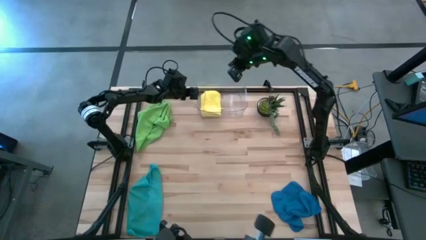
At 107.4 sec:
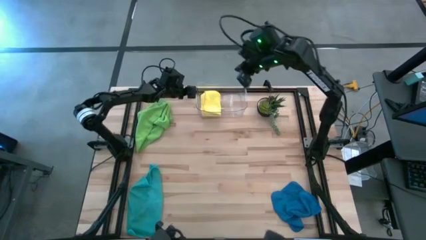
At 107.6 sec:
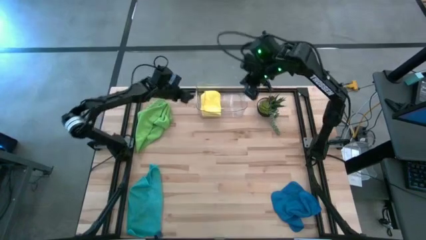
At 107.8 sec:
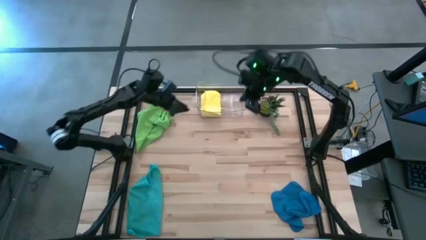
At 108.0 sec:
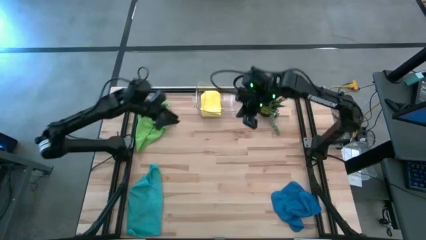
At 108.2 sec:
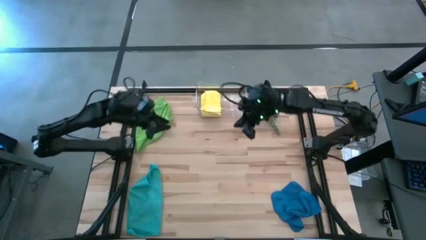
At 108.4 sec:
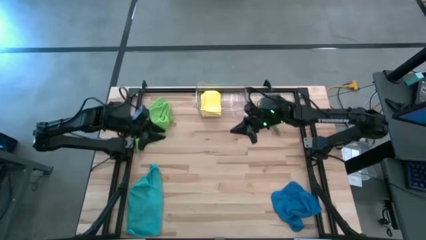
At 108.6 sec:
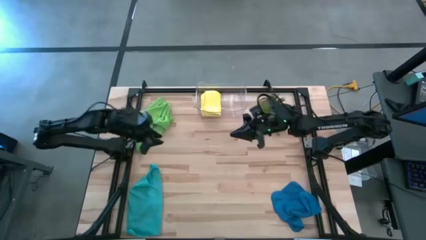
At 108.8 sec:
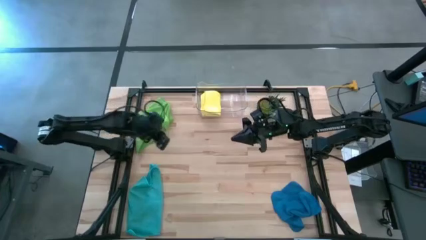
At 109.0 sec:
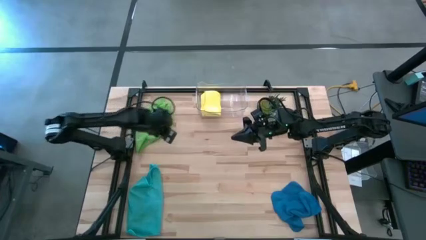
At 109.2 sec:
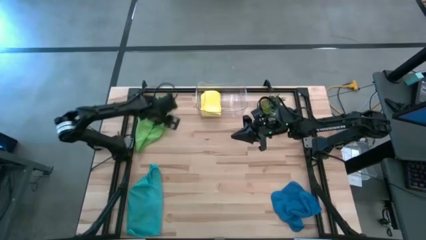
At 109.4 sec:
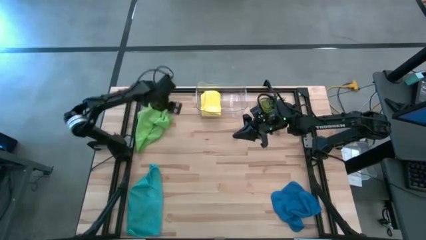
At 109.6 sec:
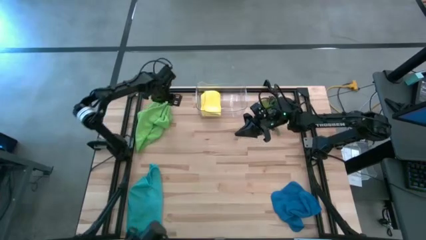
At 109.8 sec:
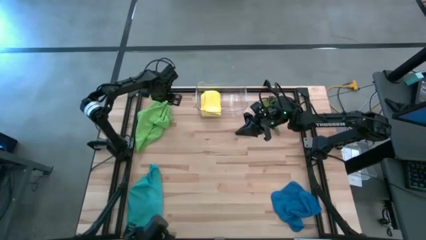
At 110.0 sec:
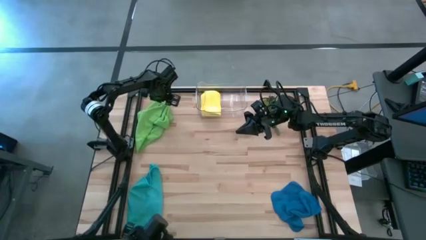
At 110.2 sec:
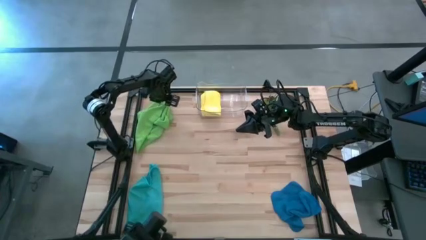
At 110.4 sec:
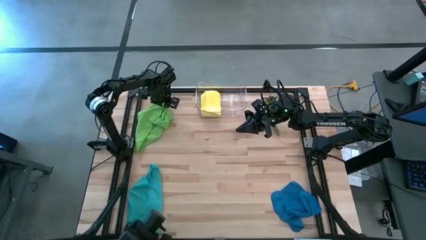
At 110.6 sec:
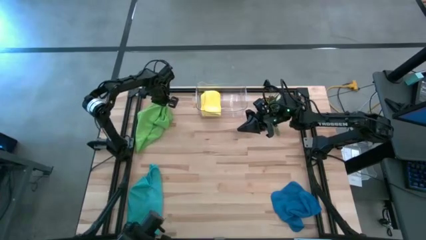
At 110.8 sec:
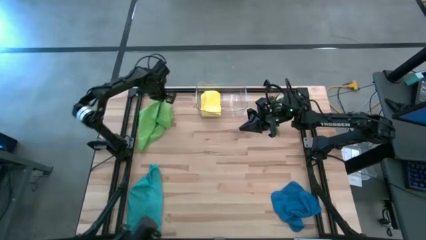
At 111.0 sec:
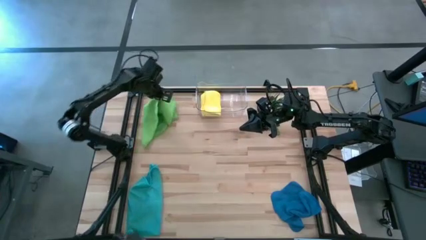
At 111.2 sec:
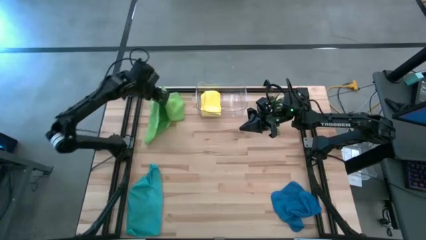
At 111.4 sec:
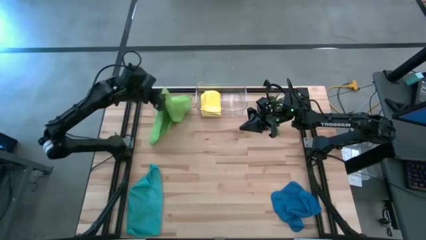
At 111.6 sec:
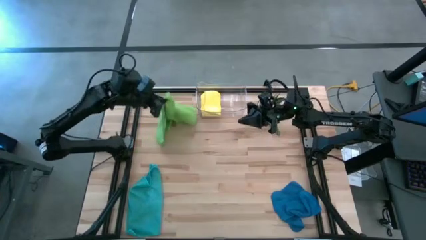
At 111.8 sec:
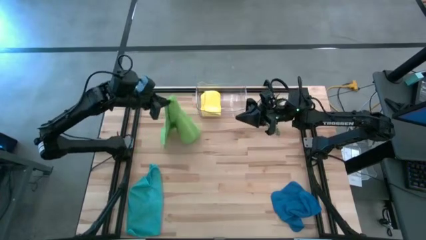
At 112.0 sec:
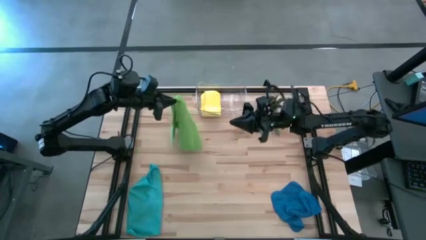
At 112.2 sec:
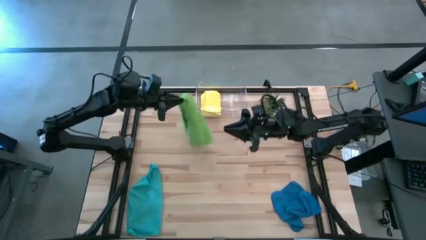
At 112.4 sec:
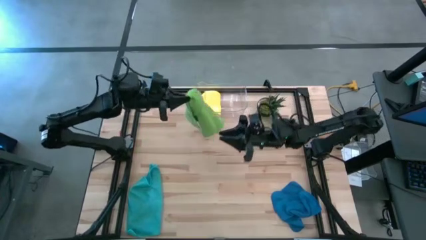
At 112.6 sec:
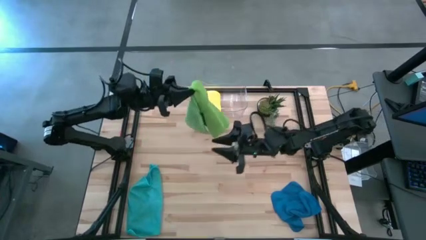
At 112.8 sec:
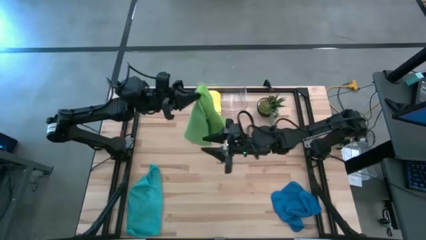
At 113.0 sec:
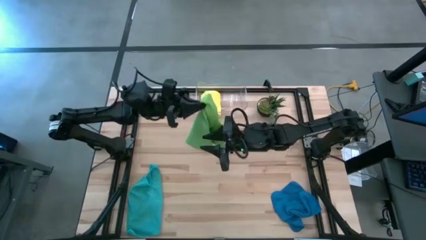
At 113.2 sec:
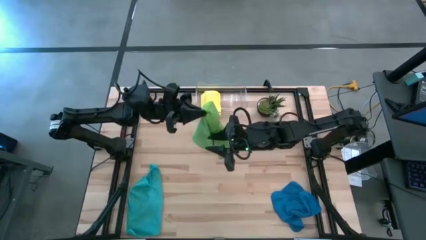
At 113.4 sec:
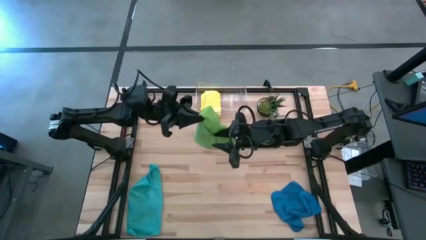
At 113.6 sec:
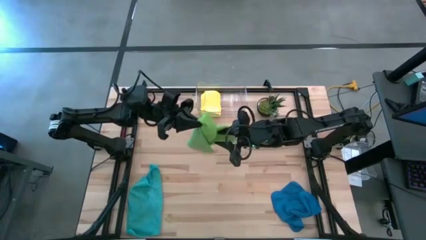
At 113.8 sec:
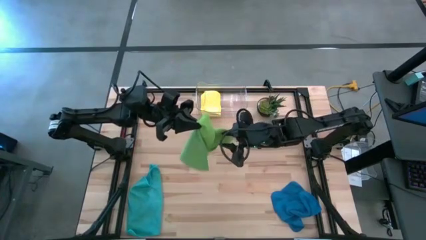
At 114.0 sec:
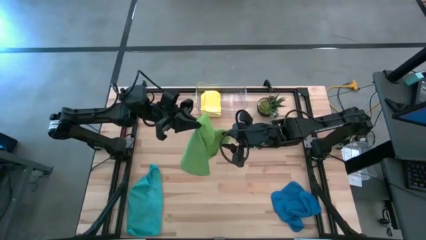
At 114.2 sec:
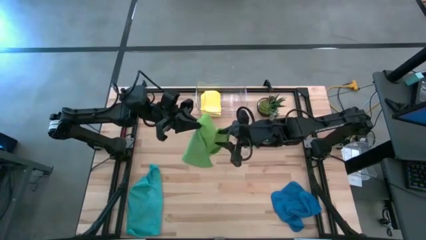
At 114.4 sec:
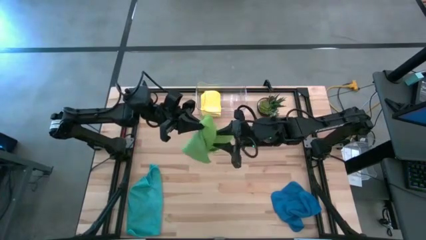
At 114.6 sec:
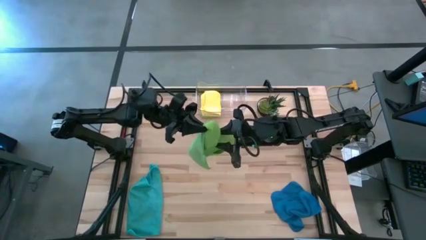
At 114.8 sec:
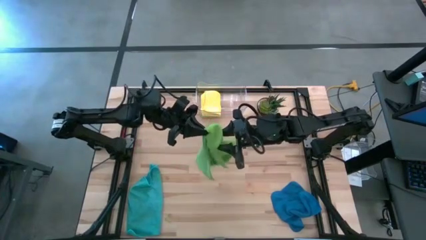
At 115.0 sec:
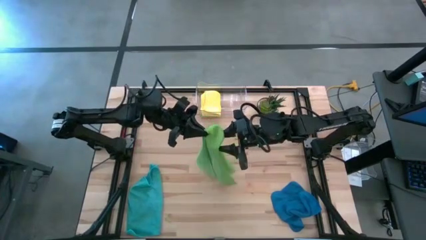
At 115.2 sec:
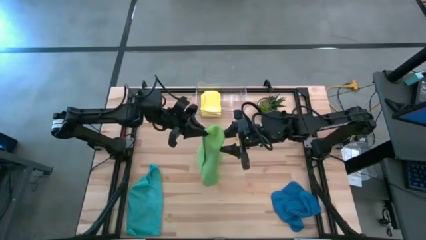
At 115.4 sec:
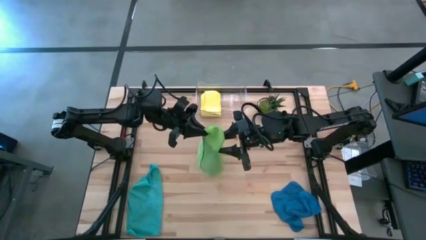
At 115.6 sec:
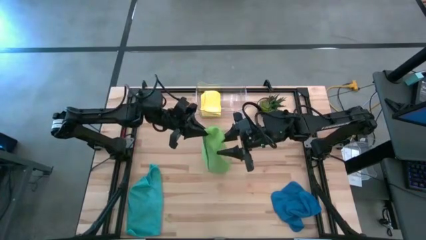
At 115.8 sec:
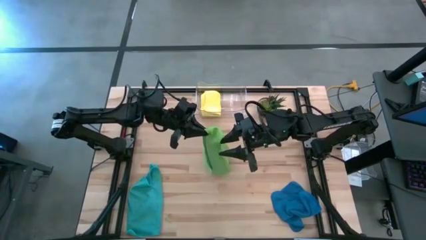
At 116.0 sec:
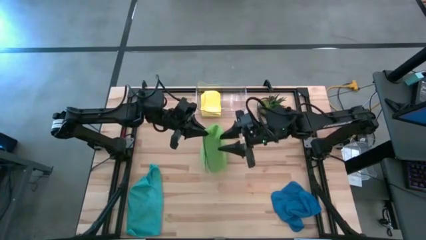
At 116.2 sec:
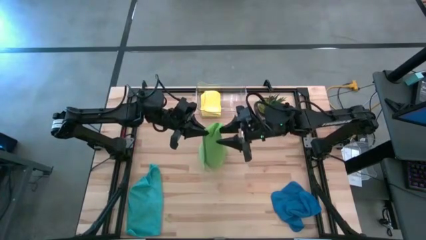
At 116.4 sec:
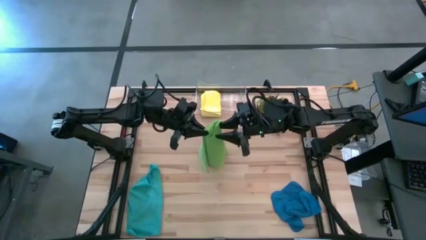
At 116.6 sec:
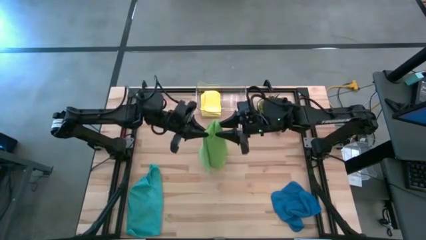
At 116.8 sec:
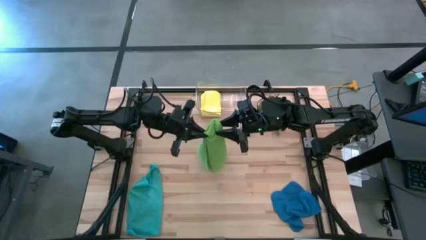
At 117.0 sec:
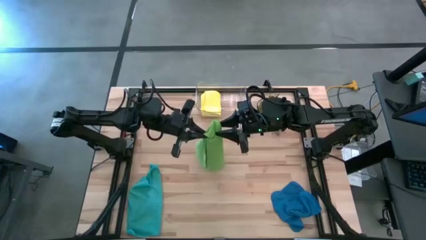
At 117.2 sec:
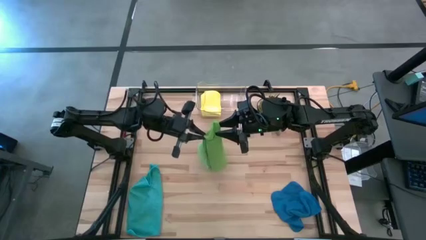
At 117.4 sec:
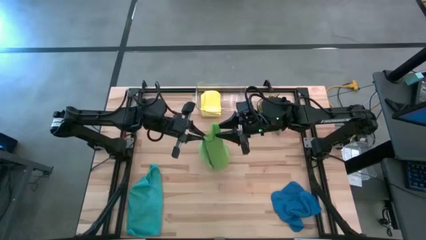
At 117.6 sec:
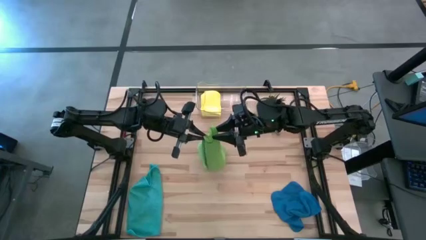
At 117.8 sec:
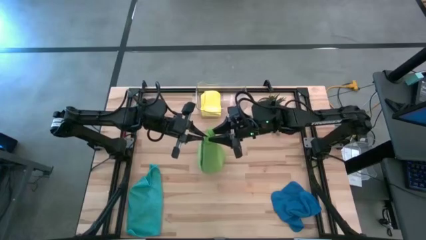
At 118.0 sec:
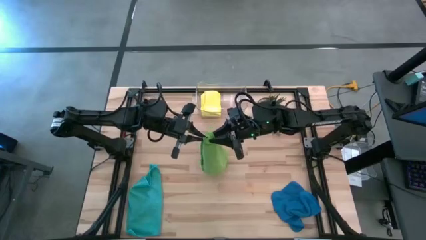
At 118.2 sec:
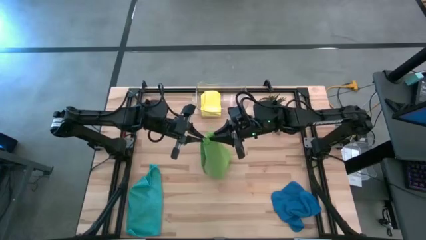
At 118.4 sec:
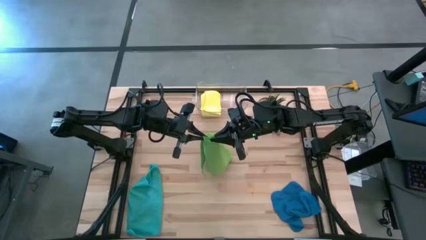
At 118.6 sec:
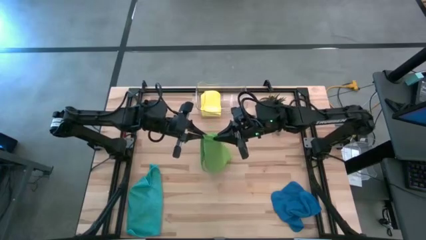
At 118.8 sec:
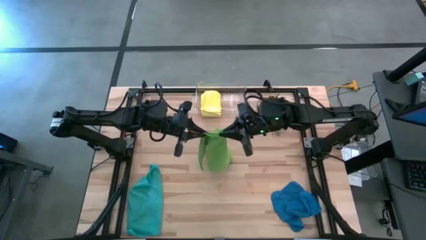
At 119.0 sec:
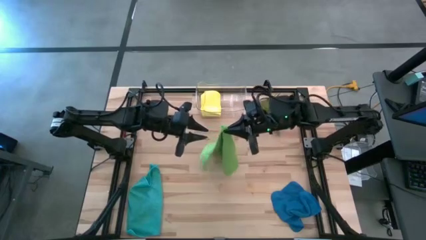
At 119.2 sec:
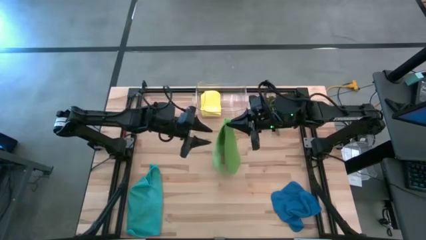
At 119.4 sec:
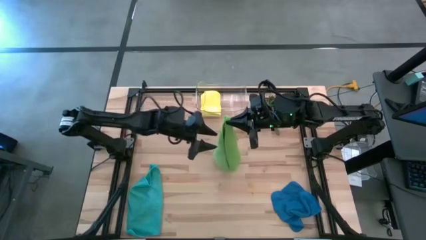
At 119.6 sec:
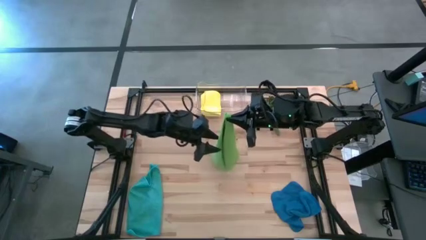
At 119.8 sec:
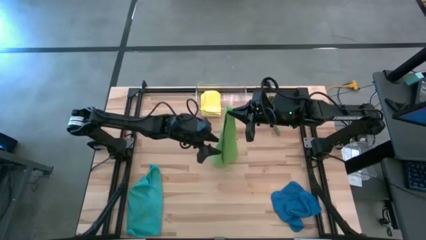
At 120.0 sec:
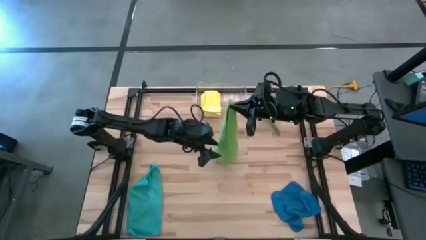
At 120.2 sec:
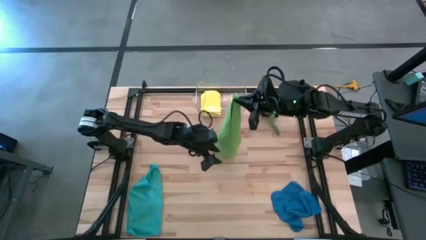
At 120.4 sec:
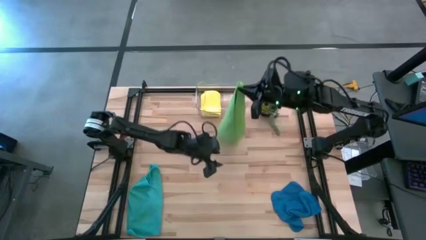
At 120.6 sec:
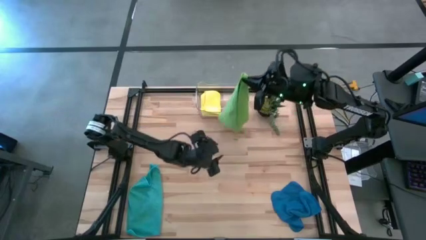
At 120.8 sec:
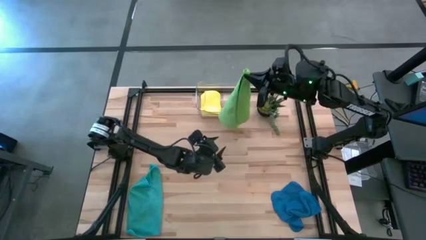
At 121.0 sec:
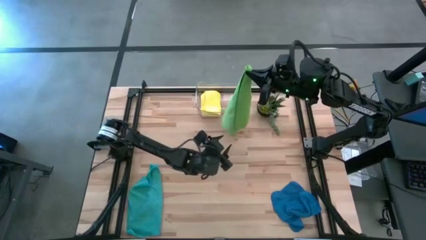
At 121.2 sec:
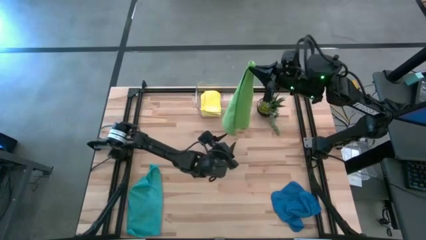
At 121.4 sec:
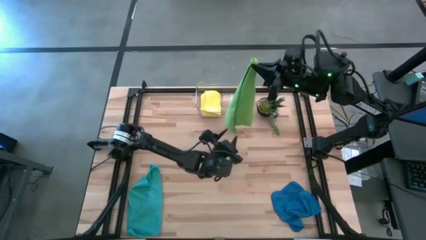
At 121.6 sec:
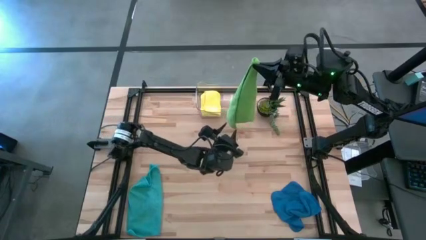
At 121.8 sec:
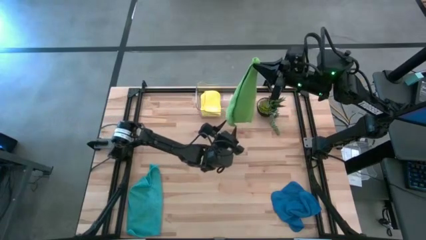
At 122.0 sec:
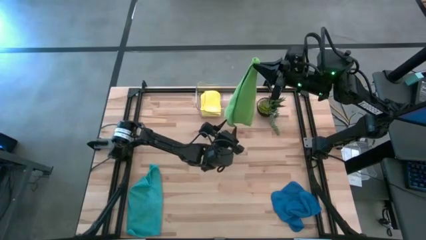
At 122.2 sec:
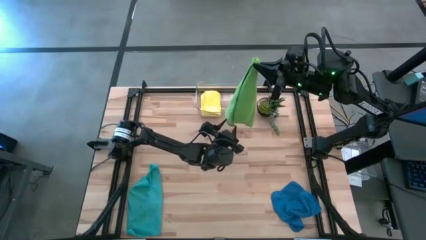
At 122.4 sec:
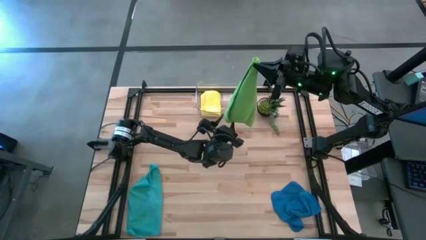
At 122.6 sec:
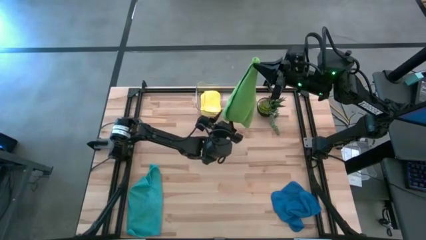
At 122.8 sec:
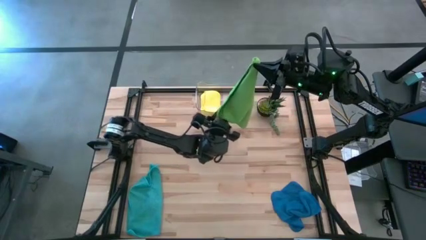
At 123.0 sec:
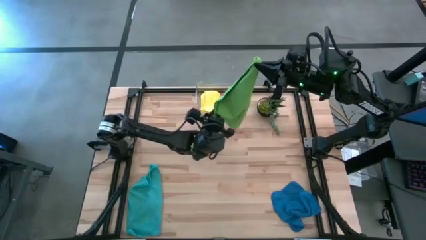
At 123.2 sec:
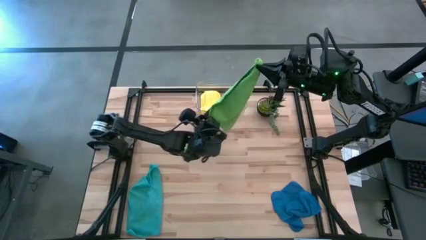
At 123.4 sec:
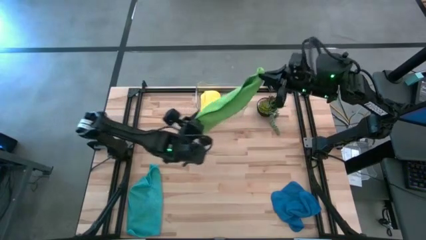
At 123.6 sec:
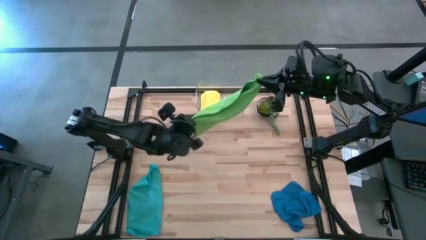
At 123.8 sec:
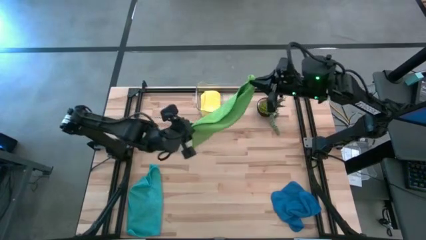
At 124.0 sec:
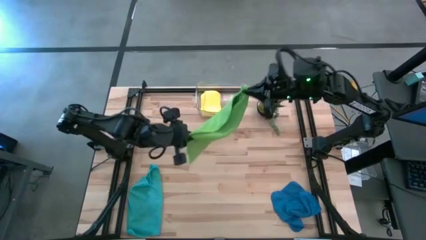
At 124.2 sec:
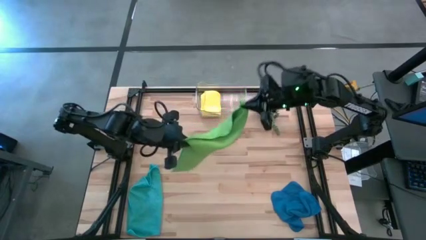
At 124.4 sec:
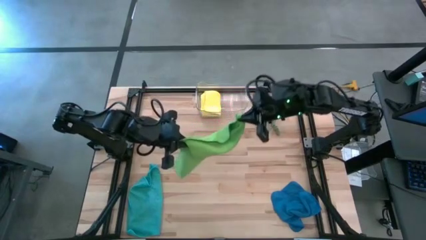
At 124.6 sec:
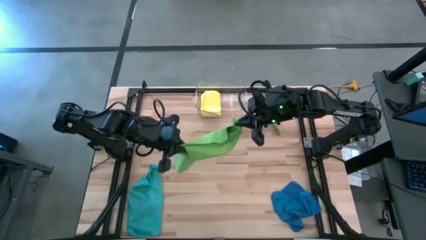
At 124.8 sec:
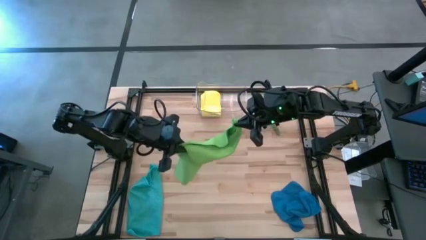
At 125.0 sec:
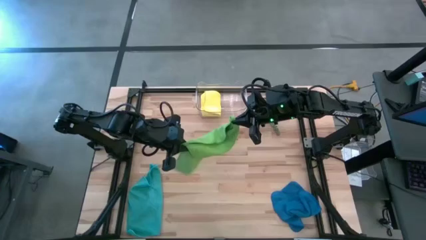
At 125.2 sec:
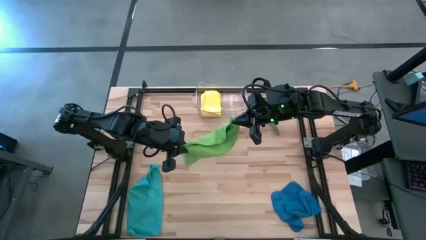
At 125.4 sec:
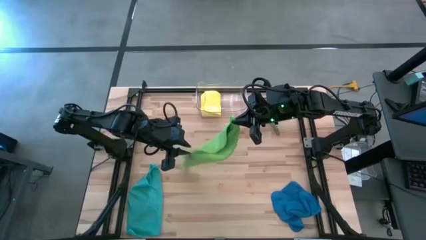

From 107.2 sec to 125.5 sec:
Task: Fold microfiber towels
Fold the green microfiber towel
